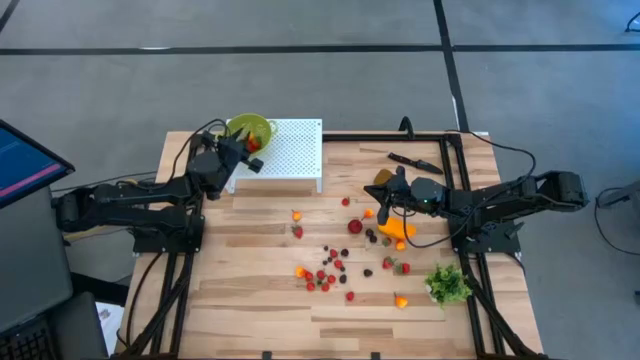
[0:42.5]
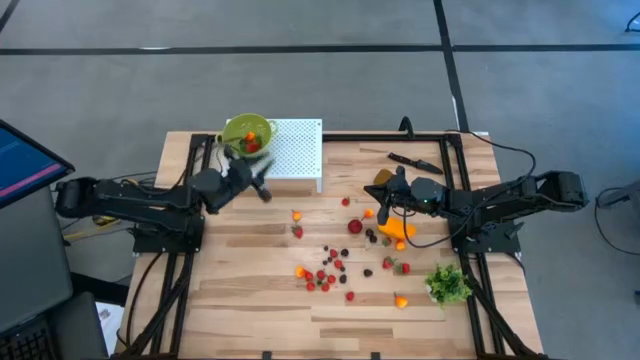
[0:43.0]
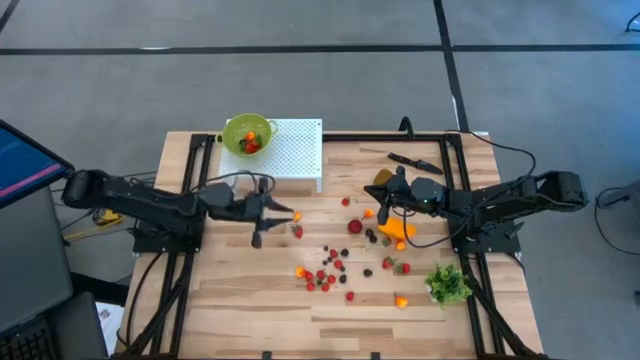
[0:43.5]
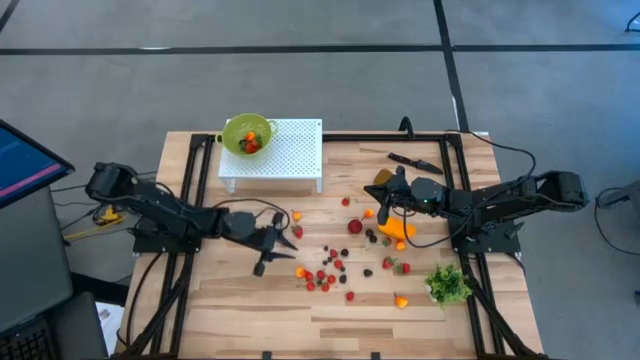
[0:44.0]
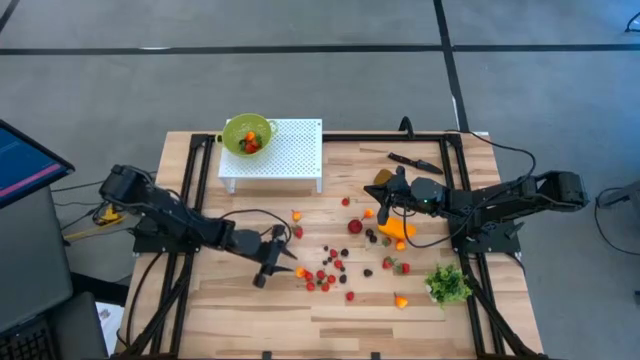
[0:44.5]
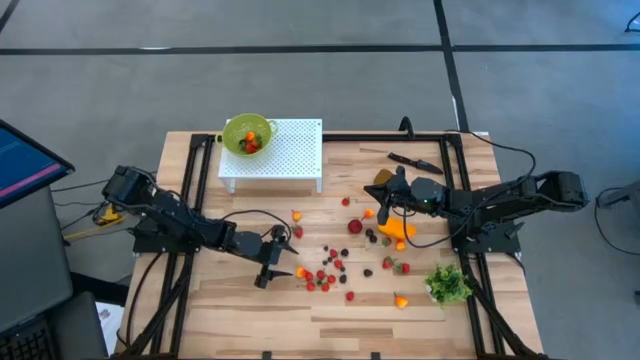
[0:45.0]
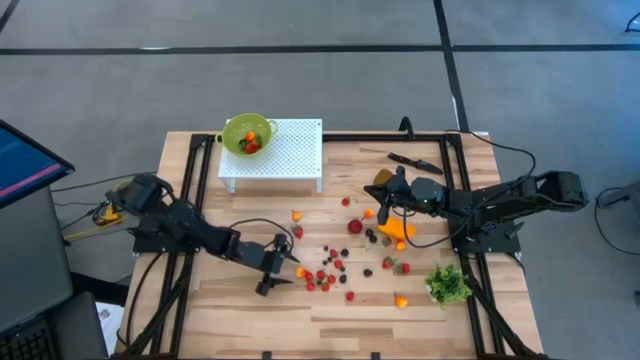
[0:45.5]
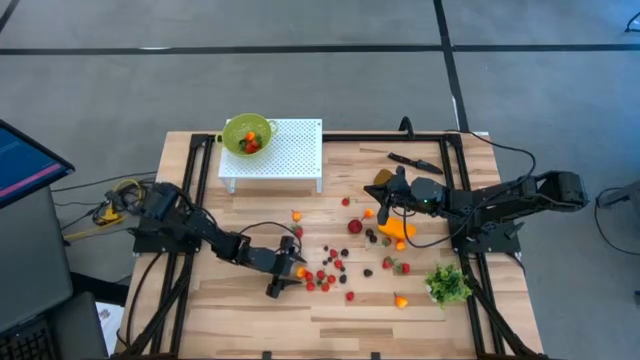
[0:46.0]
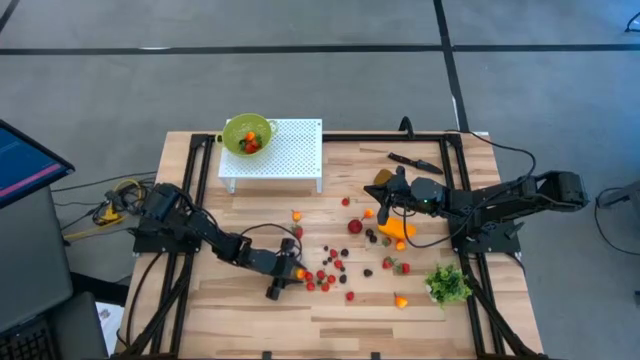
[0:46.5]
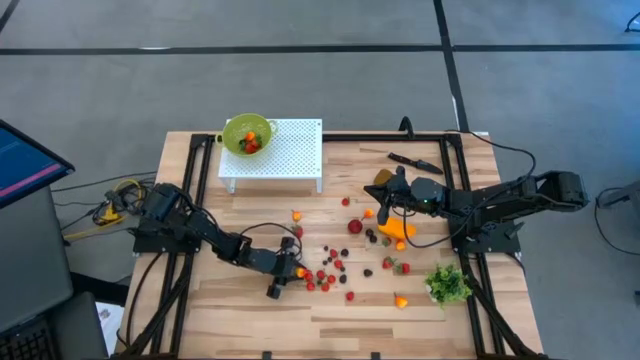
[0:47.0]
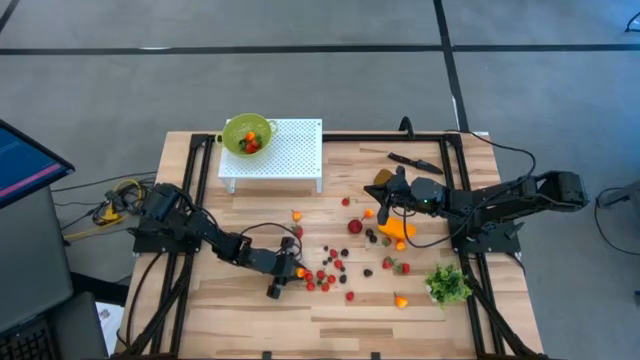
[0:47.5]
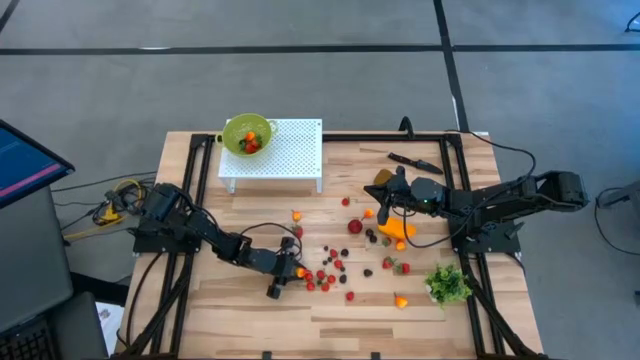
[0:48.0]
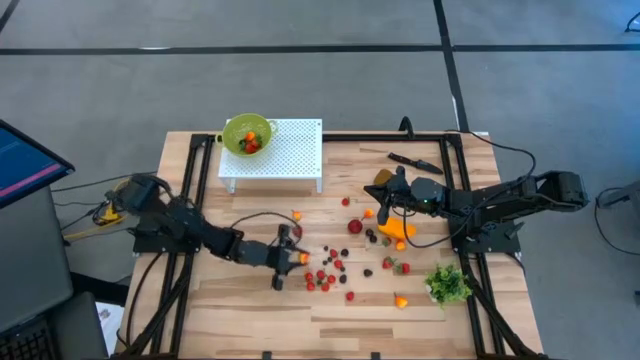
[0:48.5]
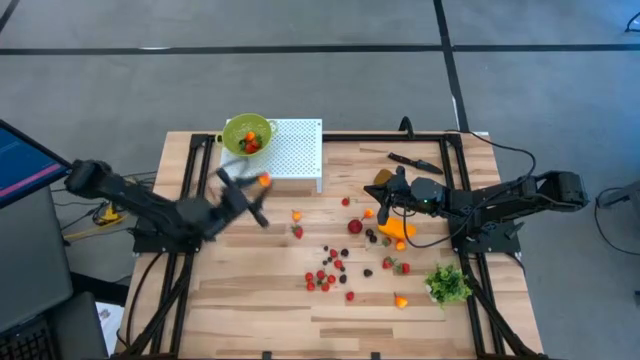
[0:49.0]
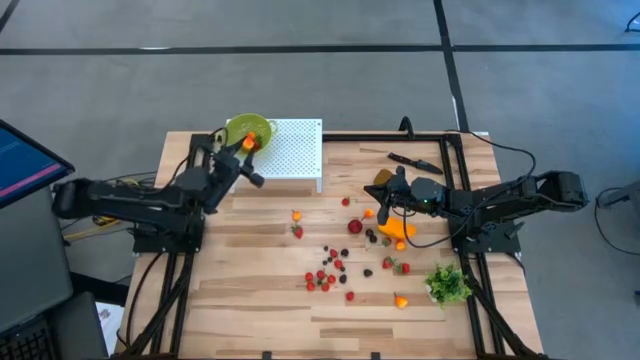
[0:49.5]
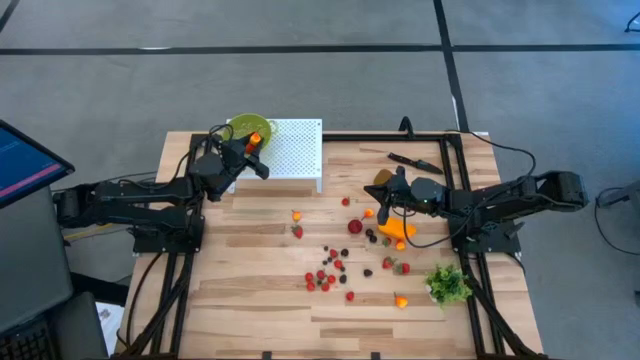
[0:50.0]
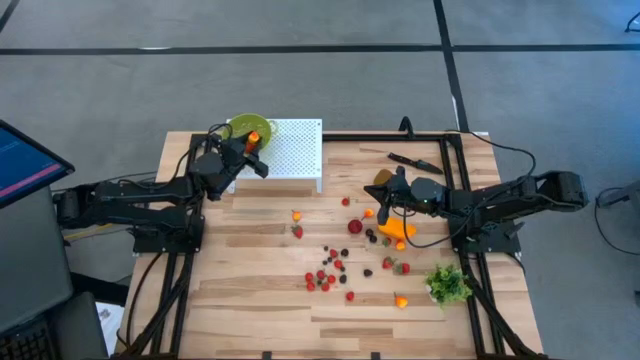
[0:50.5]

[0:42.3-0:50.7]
Task: Pick & Place Fruit
Put the peach into the green strainer bowl on the shelf

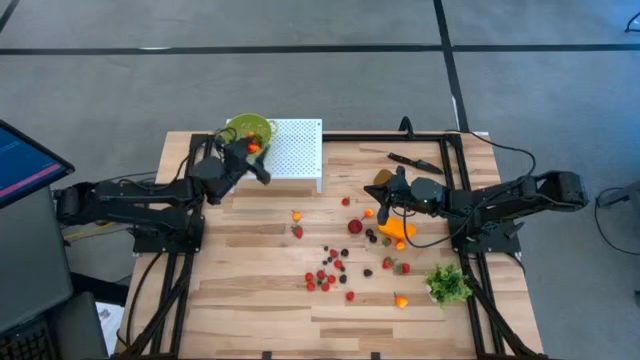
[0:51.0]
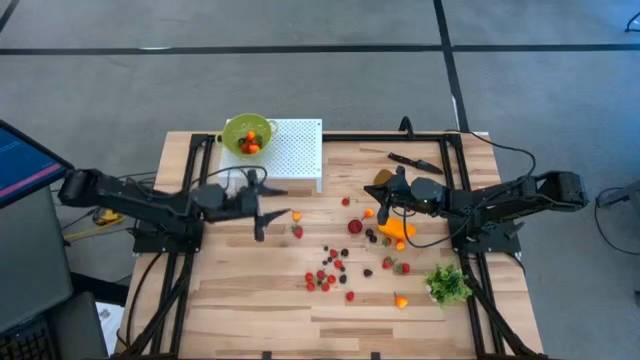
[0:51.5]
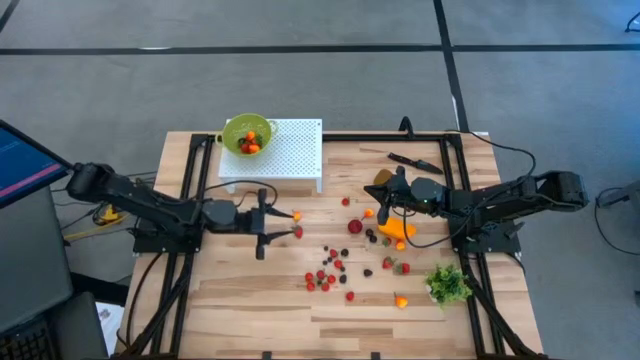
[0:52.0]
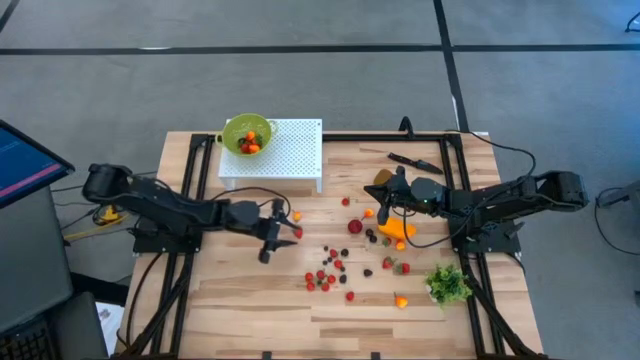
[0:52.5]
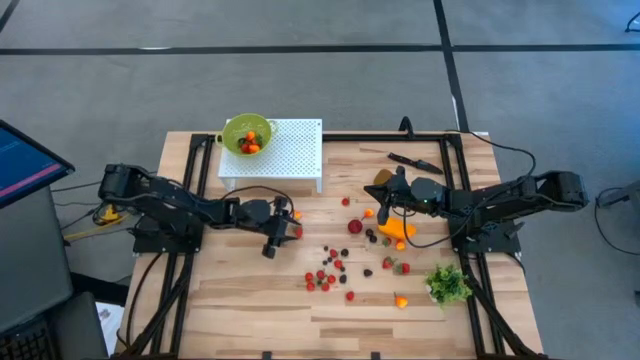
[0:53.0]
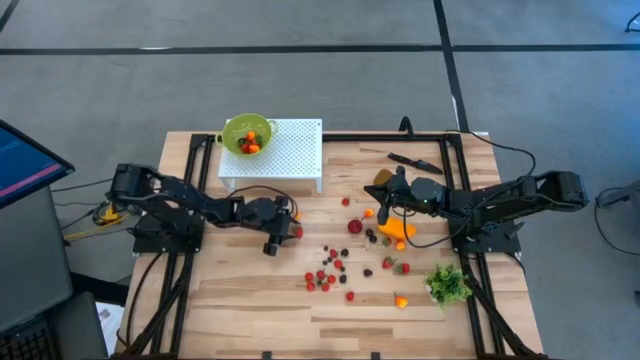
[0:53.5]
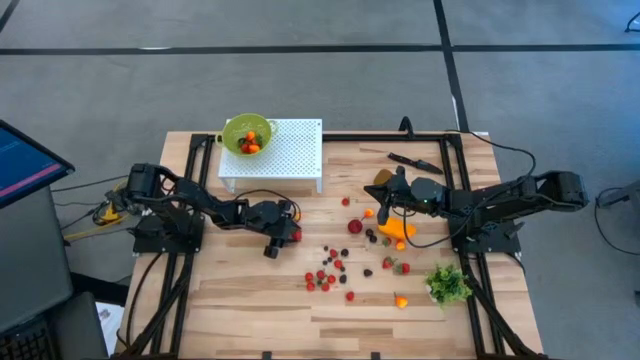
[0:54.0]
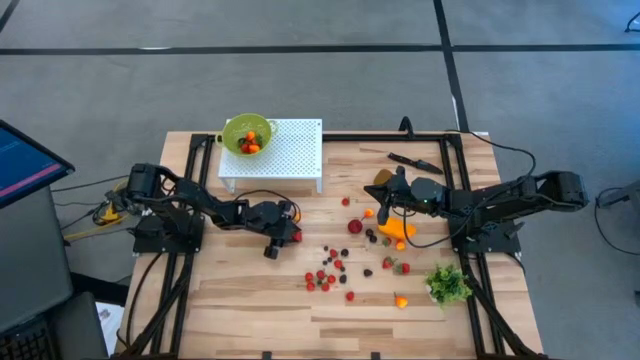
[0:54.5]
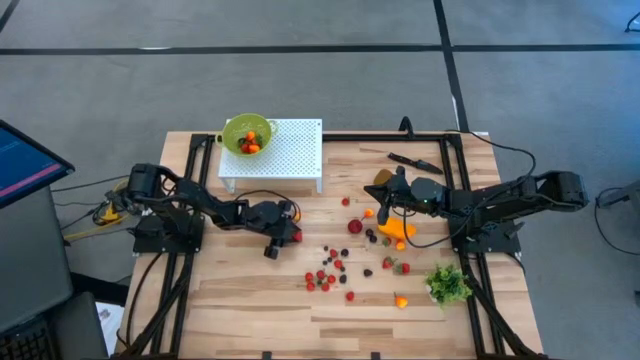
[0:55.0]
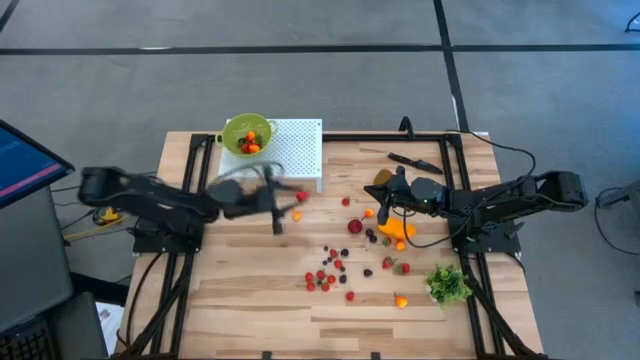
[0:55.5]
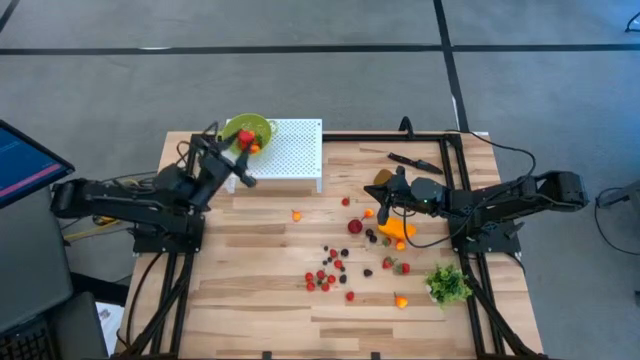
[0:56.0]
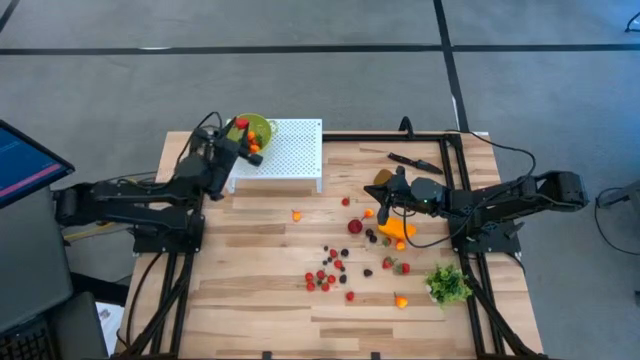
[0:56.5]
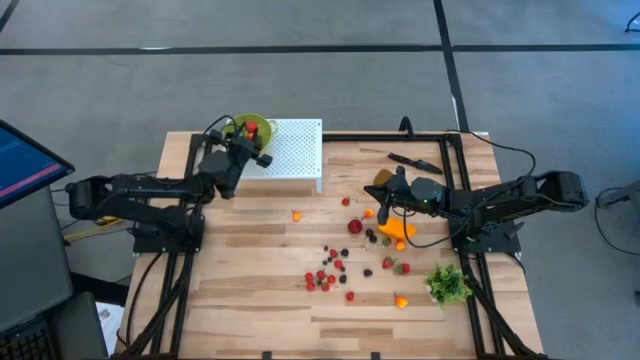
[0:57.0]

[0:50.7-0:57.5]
Put the strawberry into the green strainer bowl on the shelf

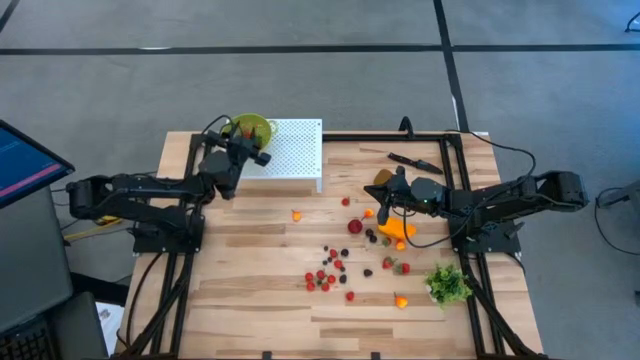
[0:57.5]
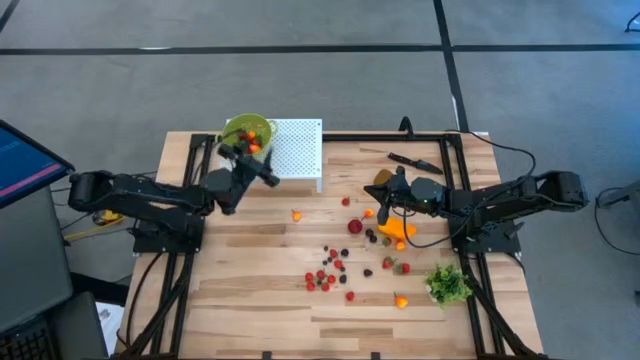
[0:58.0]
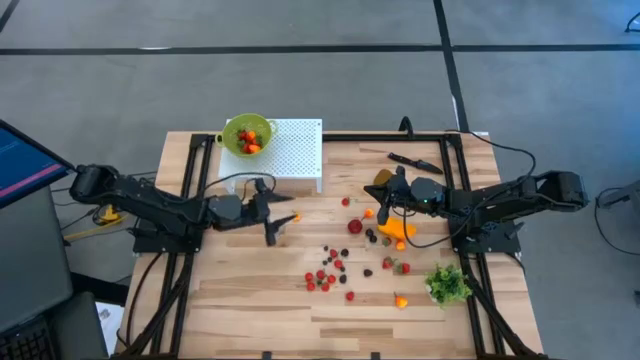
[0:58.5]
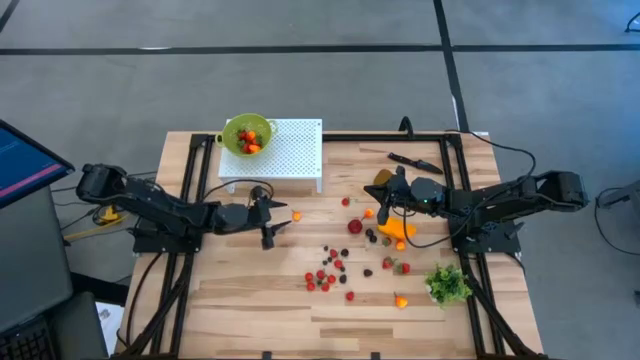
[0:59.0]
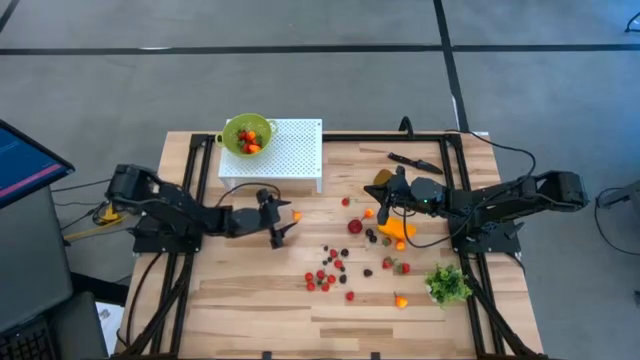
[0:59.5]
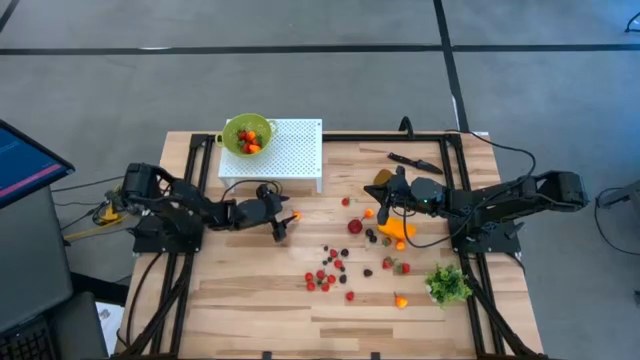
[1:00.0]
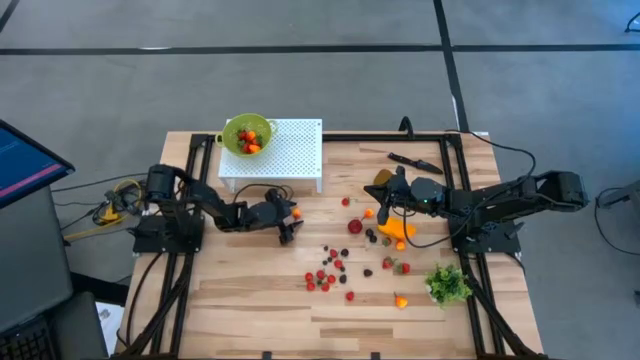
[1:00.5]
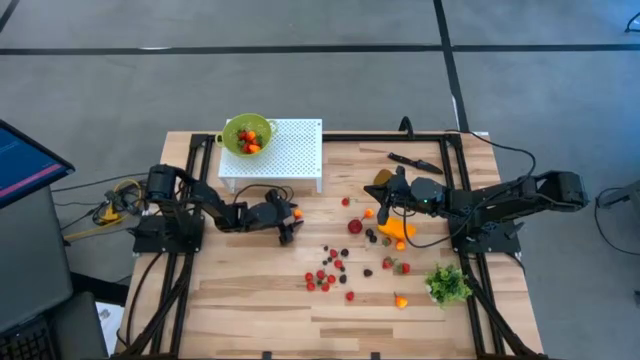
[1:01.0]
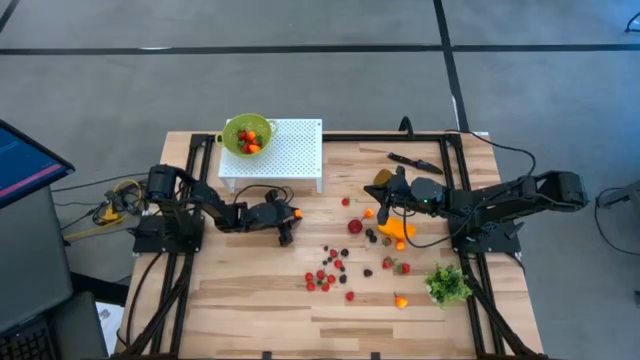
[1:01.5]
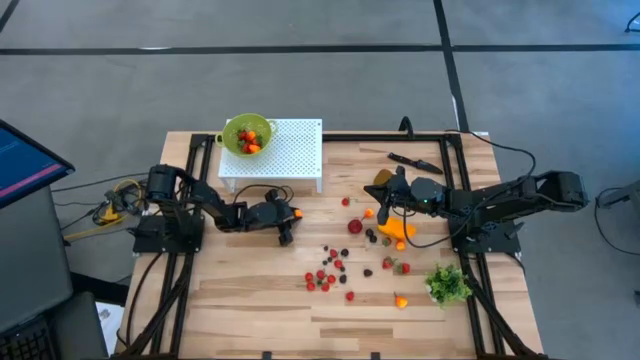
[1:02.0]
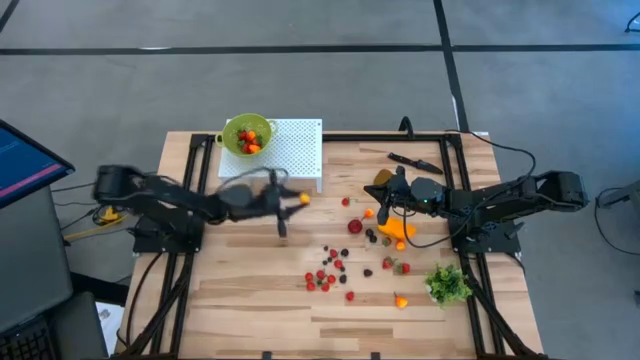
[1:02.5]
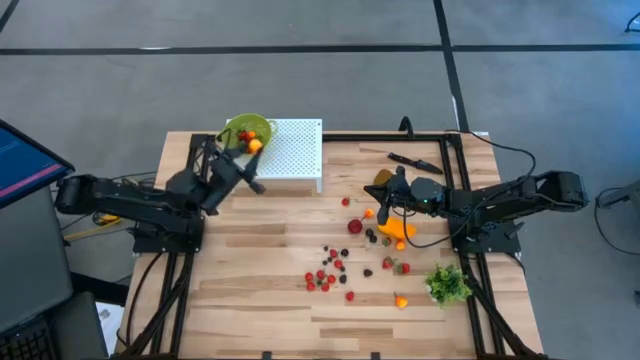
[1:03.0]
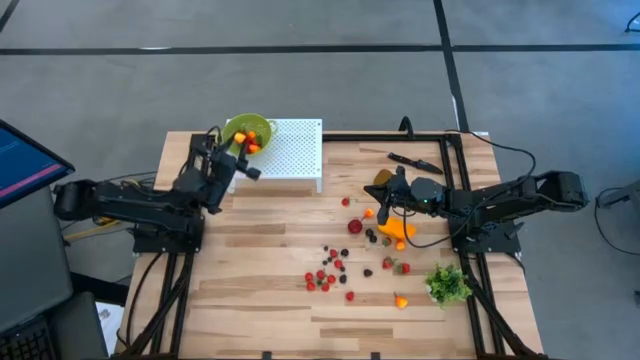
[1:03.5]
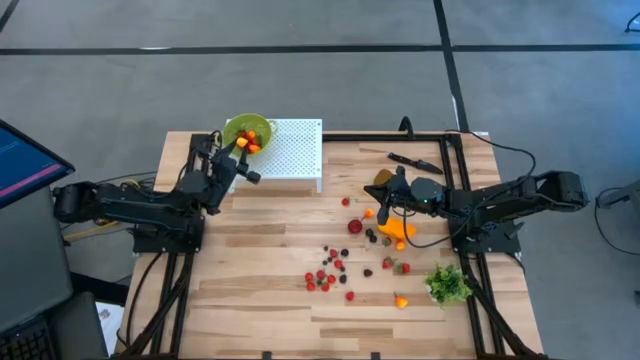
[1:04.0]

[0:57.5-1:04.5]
Put the peach into the green strainer bowl on the shelf
